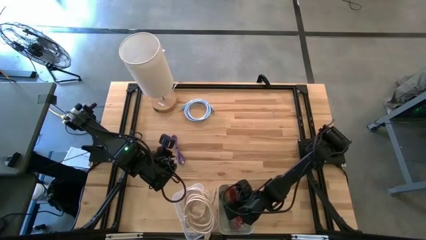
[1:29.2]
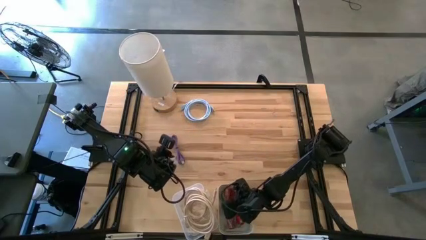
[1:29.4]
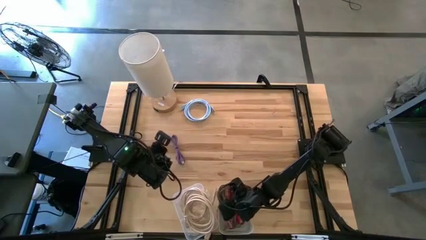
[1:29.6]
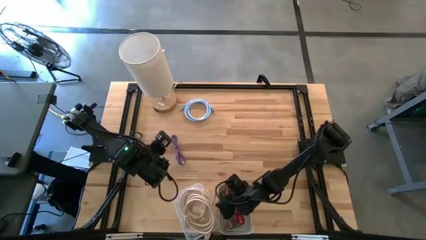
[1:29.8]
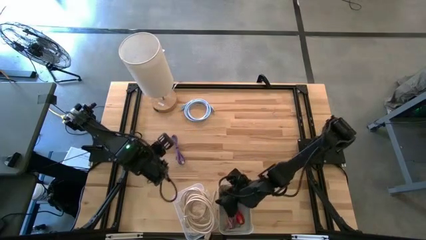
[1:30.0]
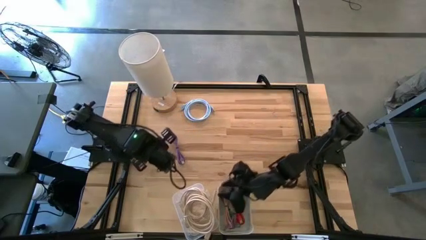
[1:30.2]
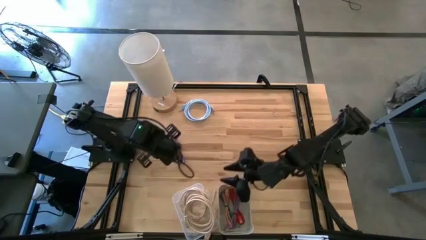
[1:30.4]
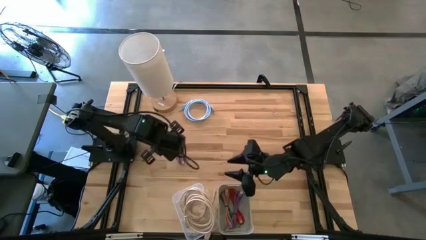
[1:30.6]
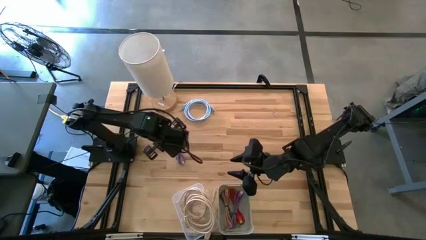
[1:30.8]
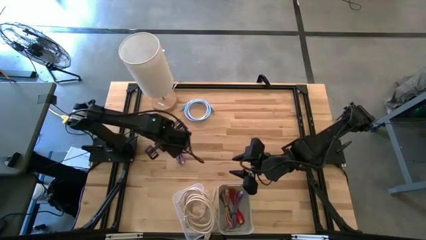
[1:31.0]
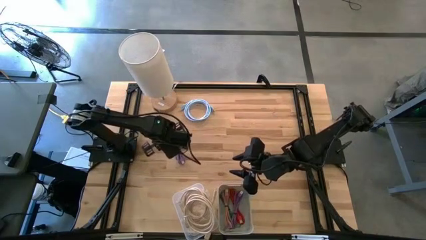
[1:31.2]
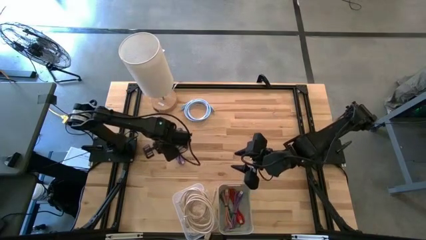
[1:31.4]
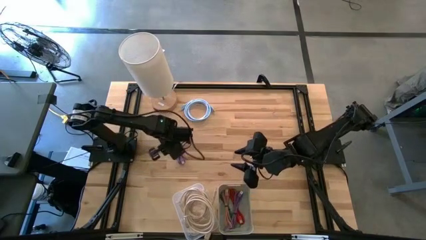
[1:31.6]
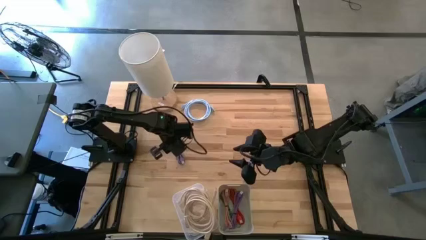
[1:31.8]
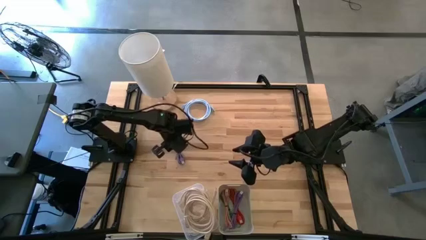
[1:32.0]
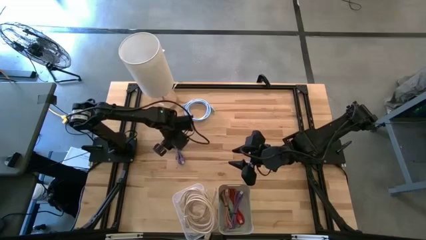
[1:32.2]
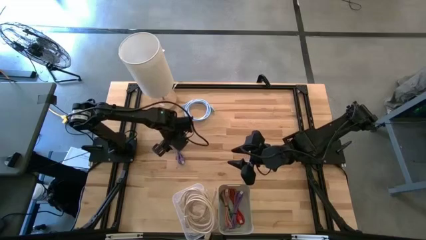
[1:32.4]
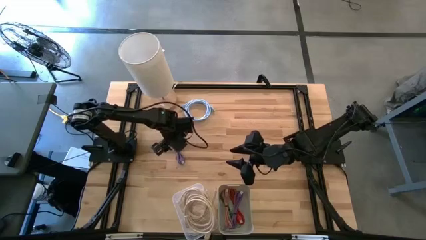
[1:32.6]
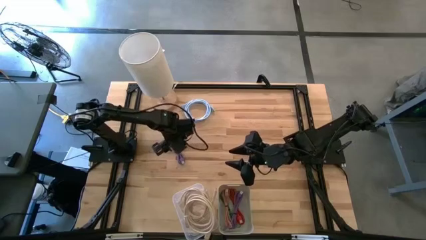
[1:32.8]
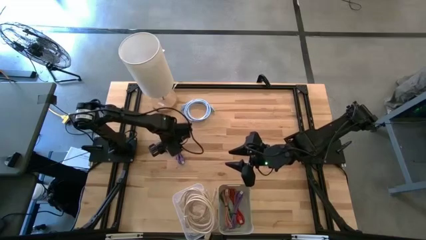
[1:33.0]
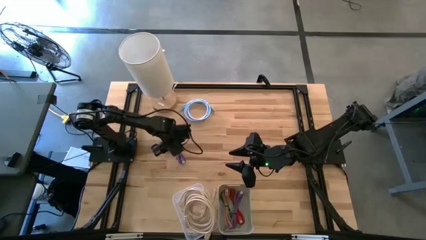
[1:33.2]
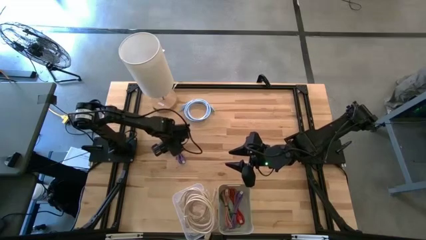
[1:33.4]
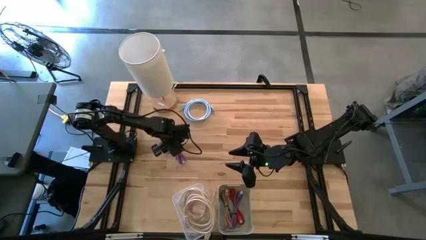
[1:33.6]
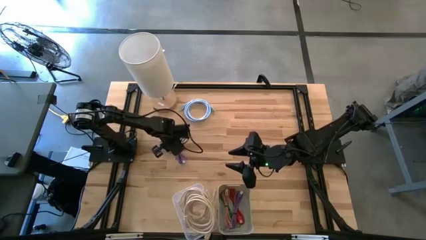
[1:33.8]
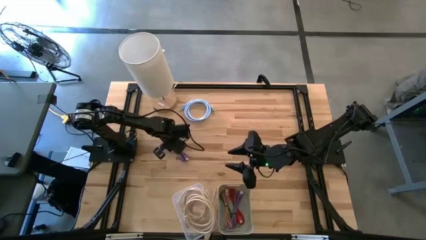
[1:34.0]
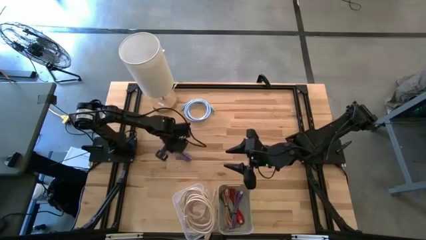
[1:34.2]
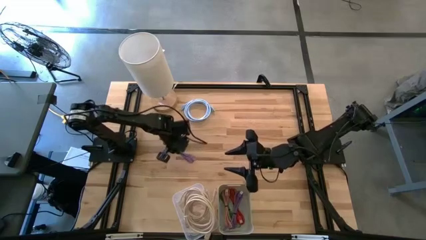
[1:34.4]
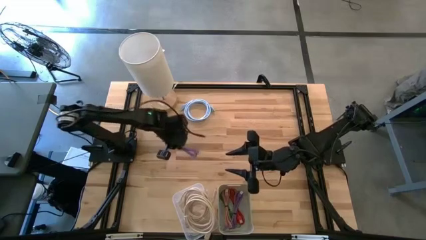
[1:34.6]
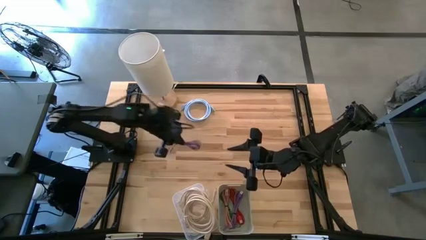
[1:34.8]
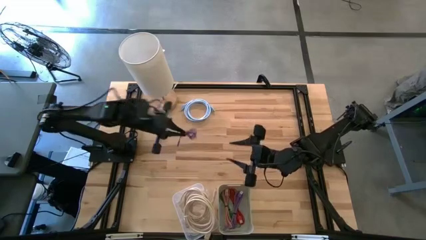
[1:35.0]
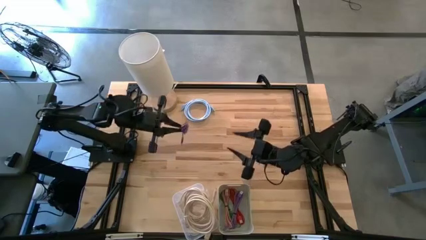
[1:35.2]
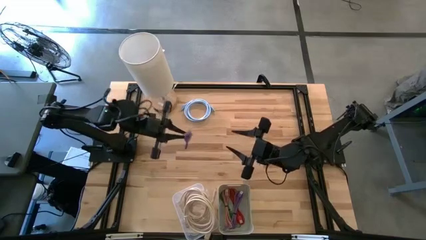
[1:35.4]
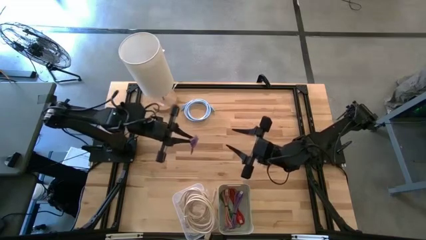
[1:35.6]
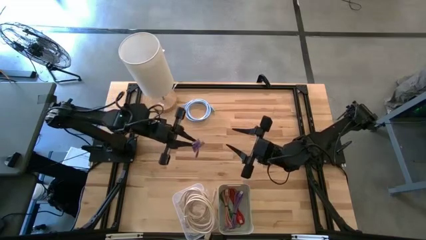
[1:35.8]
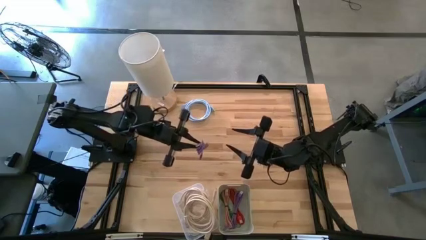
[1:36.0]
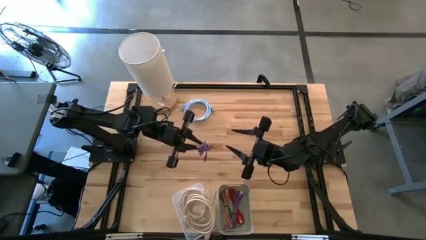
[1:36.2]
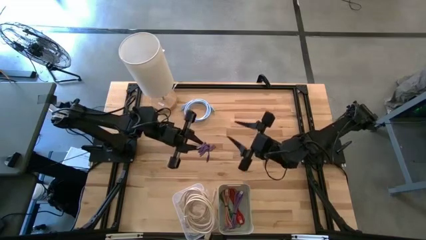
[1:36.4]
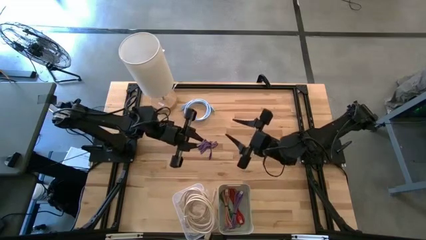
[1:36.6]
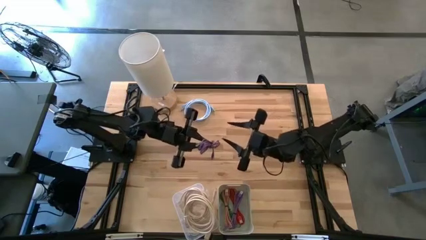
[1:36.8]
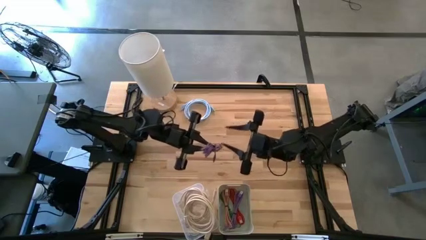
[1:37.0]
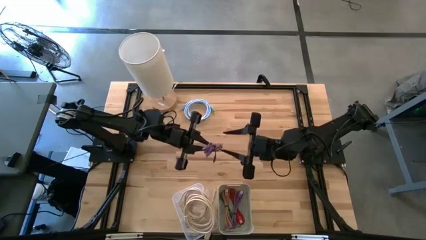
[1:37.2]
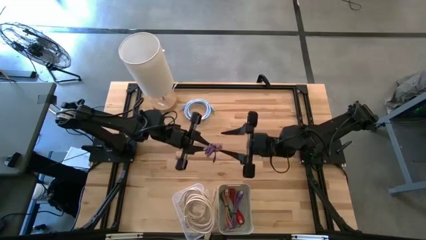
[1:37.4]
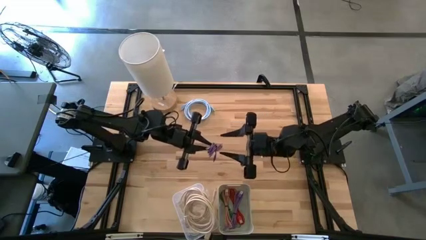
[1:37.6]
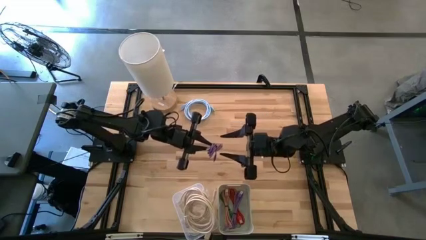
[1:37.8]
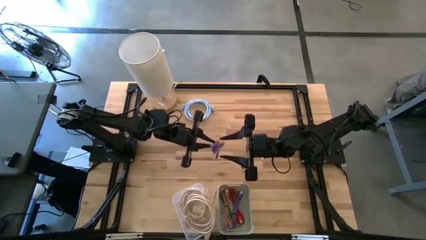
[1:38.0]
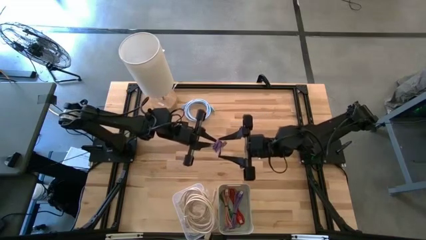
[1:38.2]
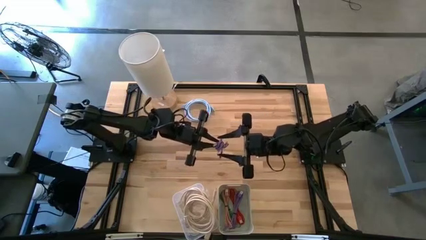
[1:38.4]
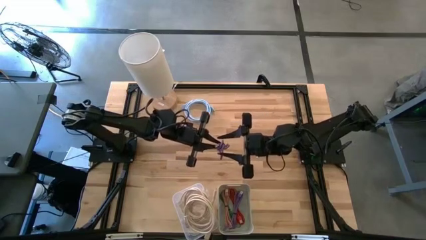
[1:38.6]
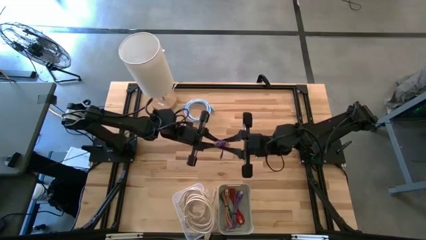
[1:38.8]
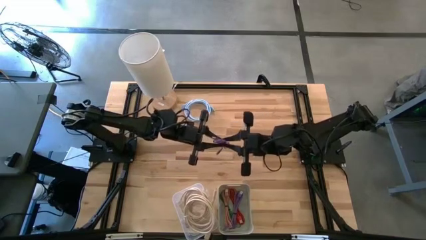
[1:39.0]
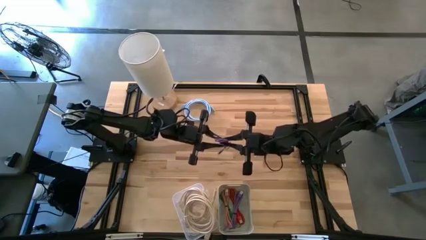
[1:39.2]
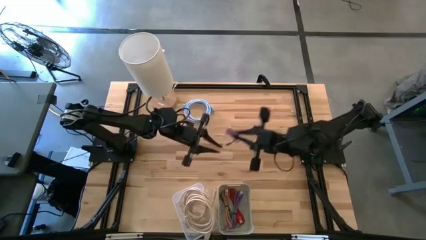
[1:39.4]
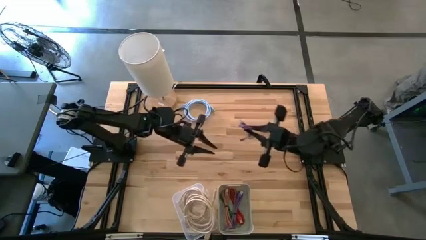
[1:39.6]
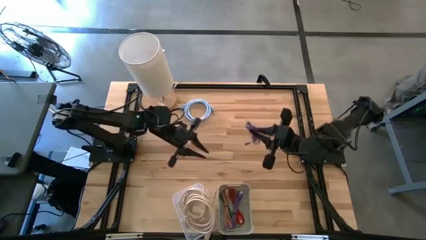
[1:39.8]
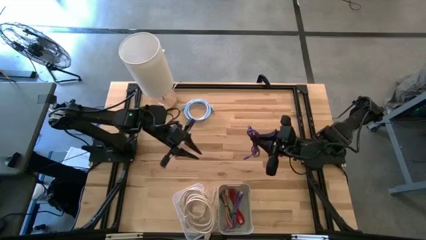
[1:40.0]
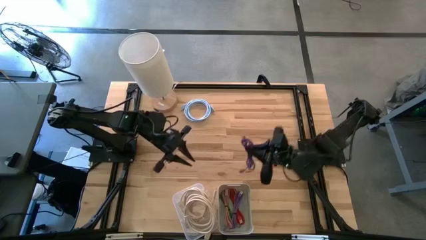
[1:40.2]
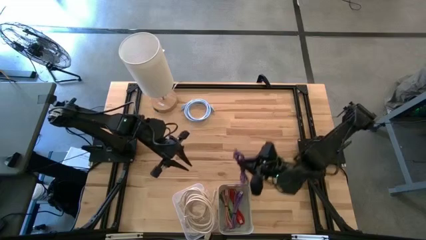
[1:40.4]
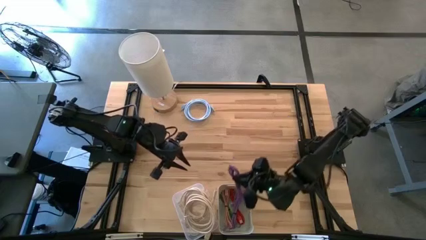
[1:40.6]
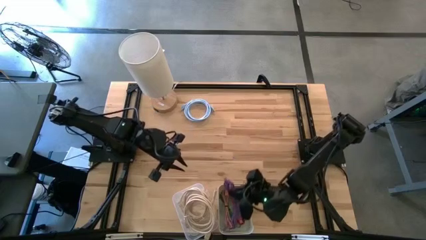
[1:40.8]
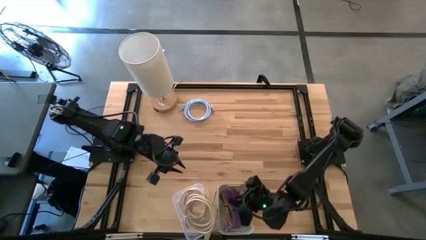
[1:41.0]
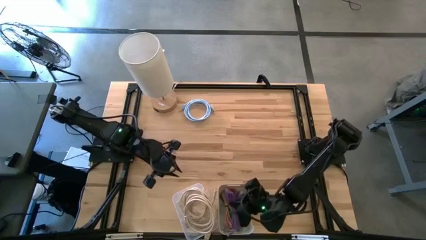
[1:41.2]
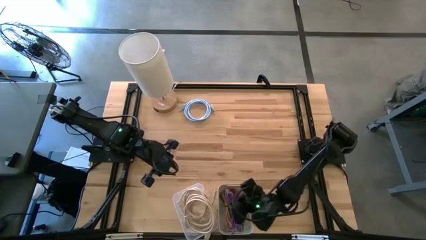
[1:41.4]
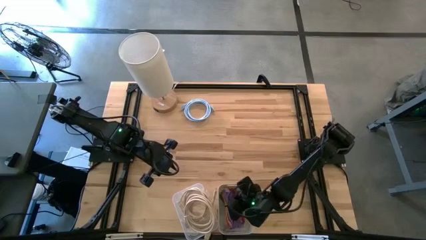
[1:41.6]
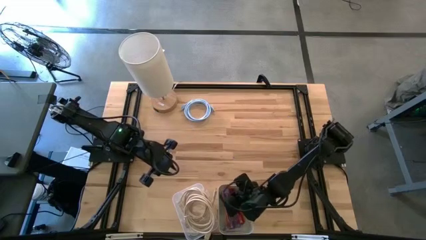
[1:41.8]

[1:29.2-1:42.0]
Task: Pick & Place USB Port
Put the purple USB cable into the white bin
